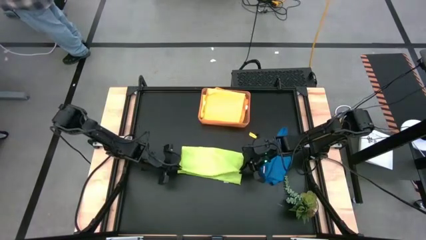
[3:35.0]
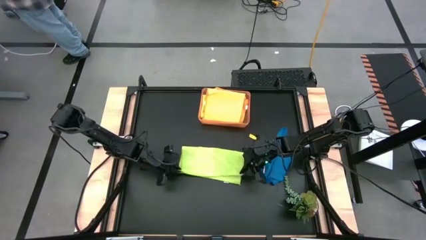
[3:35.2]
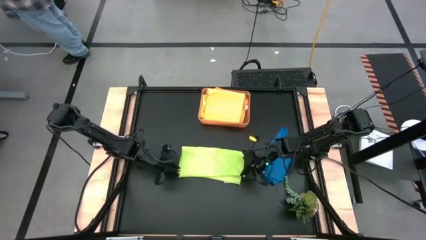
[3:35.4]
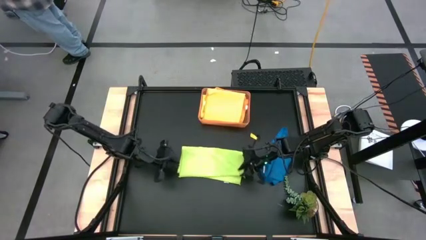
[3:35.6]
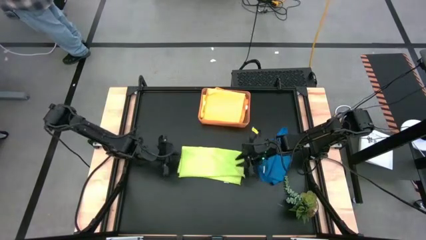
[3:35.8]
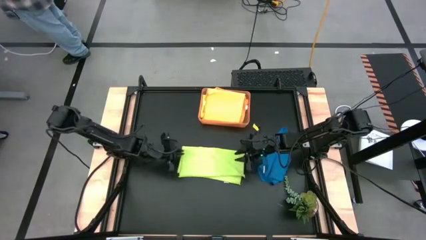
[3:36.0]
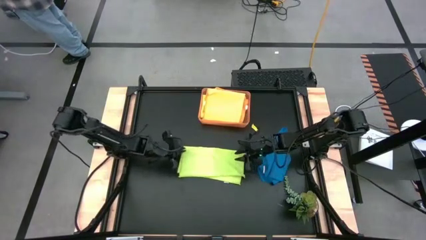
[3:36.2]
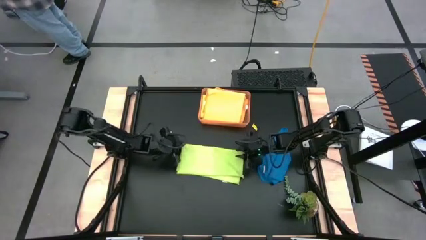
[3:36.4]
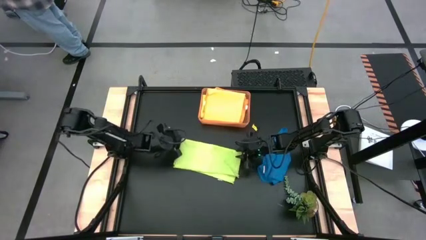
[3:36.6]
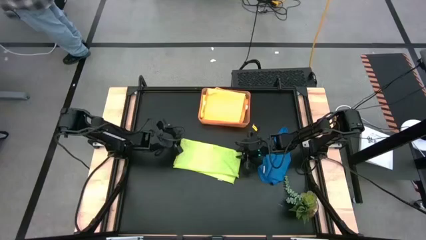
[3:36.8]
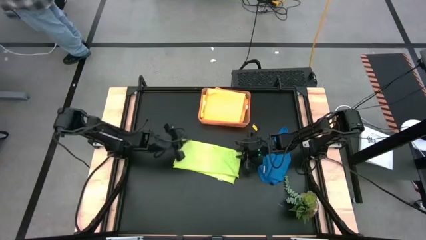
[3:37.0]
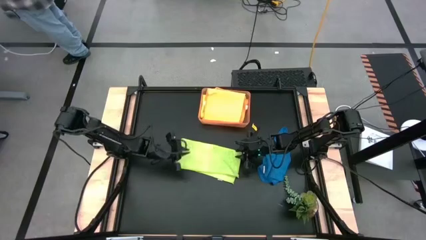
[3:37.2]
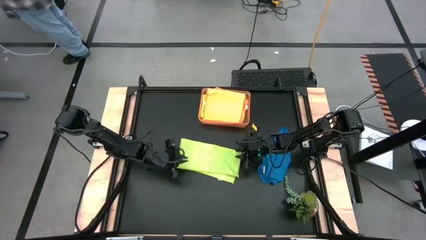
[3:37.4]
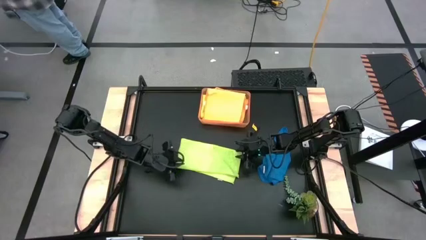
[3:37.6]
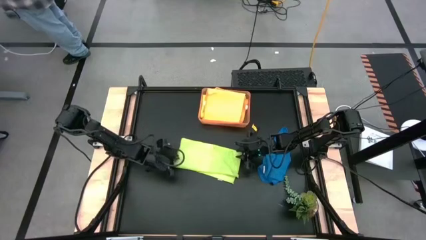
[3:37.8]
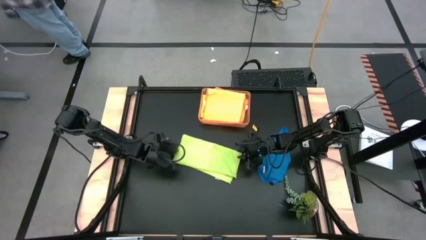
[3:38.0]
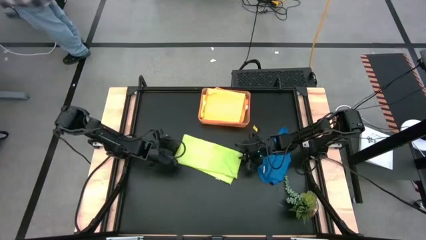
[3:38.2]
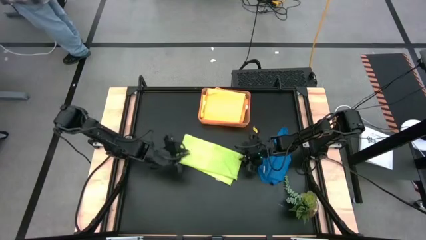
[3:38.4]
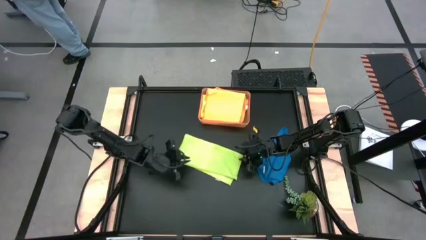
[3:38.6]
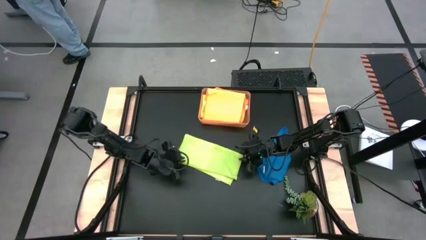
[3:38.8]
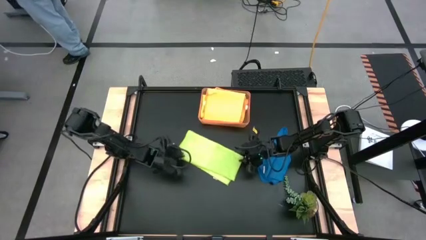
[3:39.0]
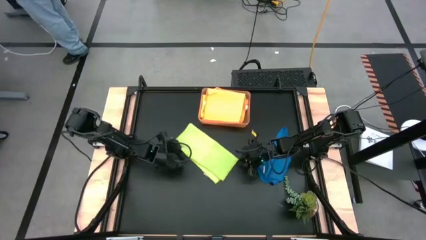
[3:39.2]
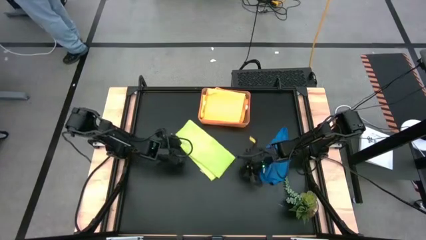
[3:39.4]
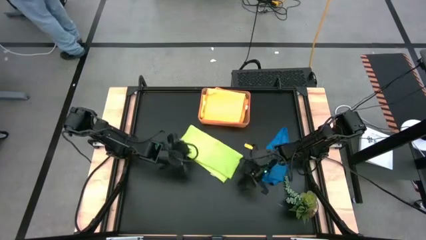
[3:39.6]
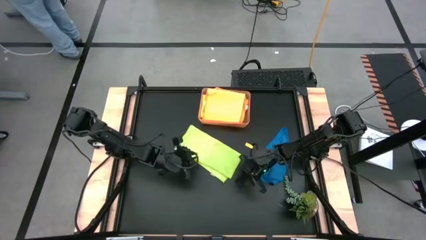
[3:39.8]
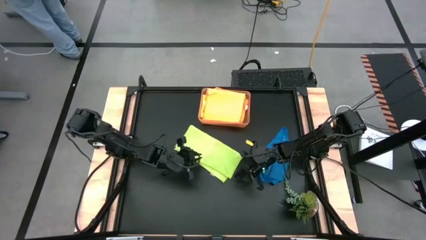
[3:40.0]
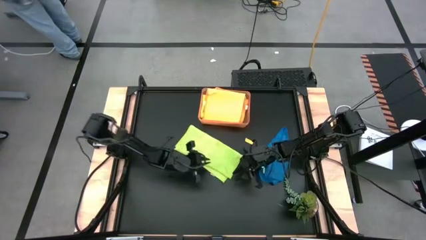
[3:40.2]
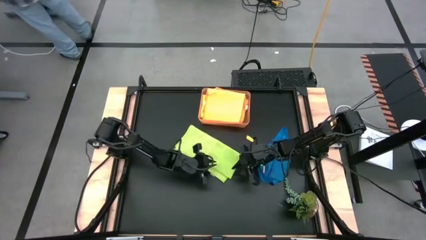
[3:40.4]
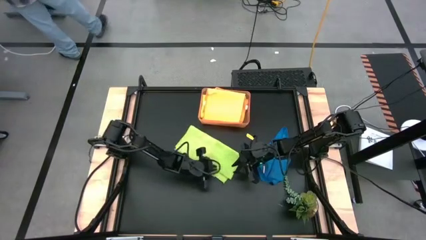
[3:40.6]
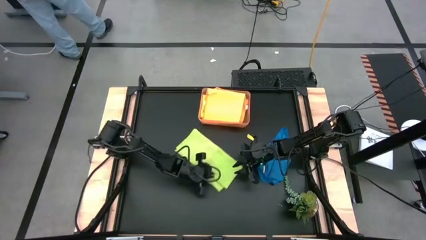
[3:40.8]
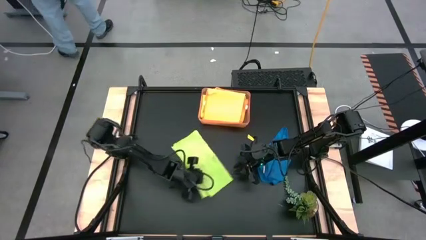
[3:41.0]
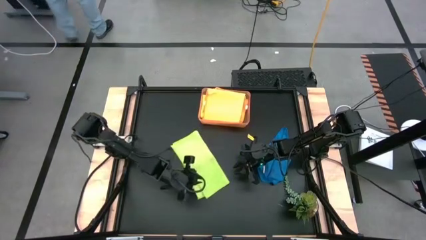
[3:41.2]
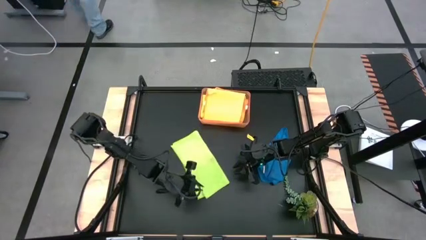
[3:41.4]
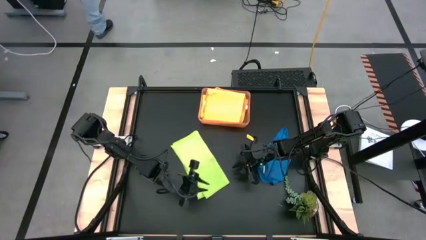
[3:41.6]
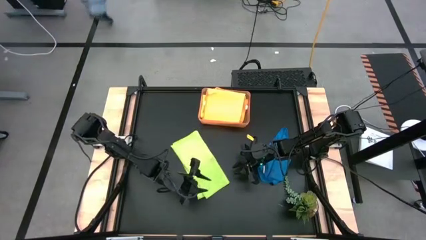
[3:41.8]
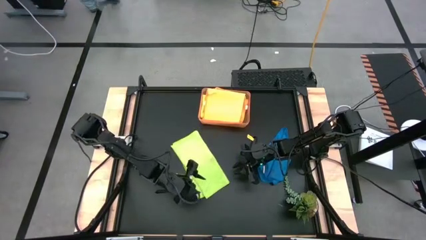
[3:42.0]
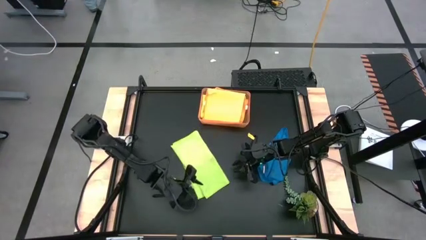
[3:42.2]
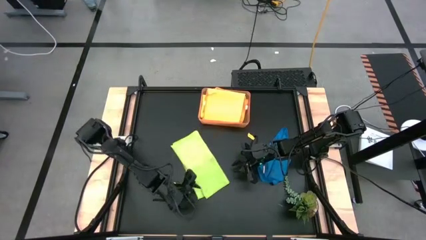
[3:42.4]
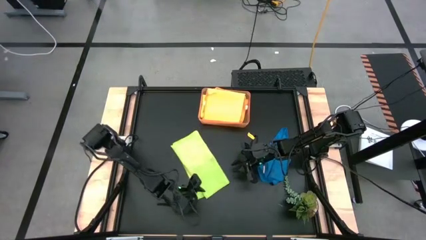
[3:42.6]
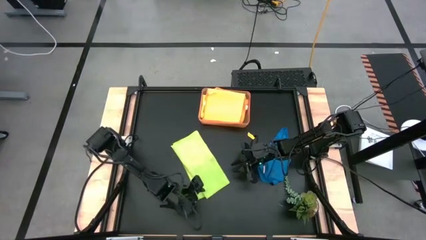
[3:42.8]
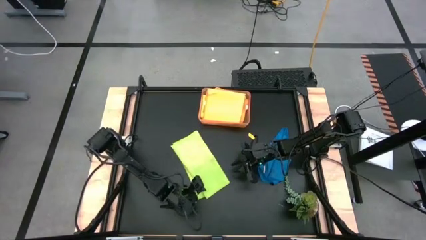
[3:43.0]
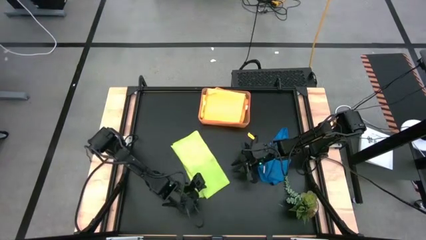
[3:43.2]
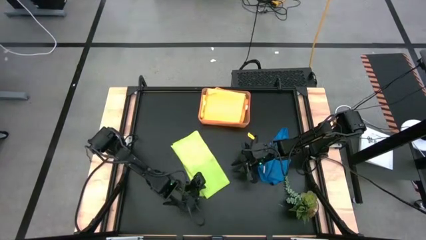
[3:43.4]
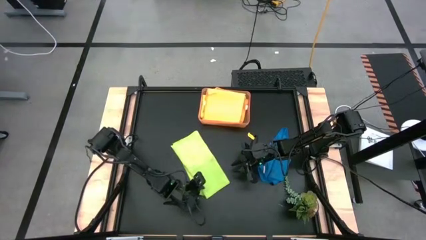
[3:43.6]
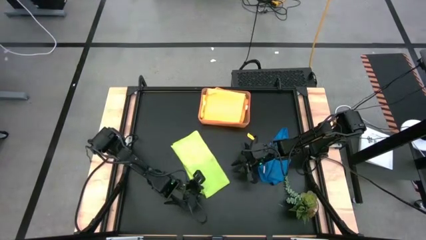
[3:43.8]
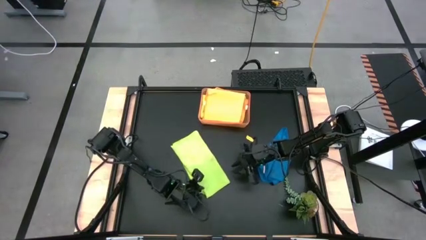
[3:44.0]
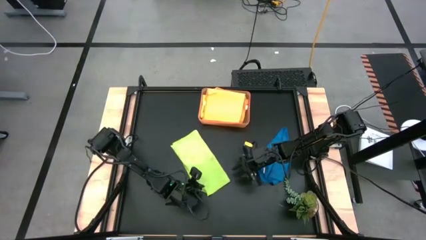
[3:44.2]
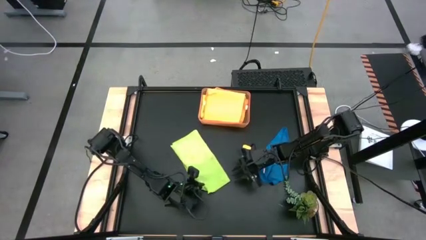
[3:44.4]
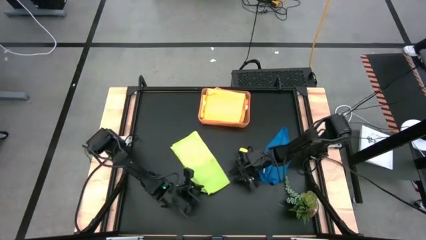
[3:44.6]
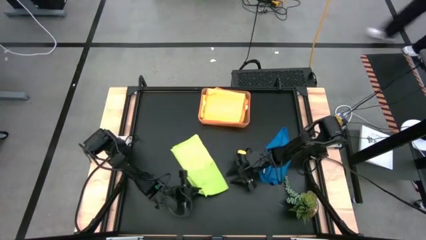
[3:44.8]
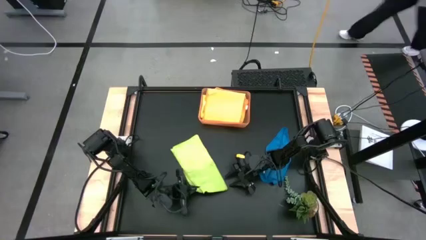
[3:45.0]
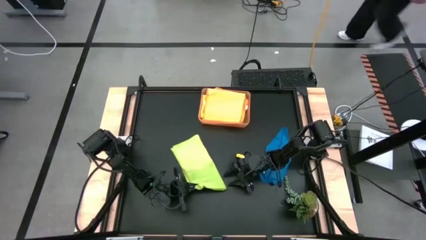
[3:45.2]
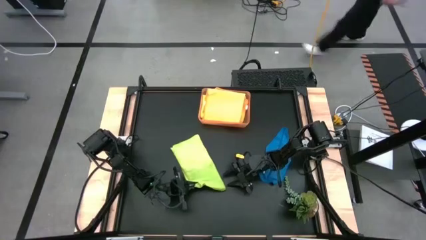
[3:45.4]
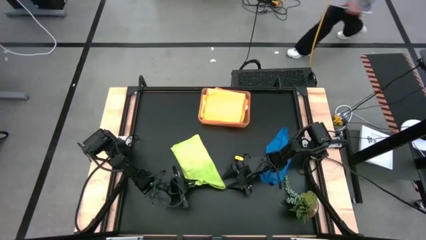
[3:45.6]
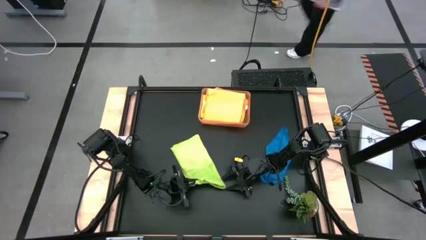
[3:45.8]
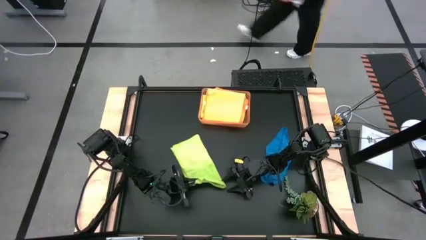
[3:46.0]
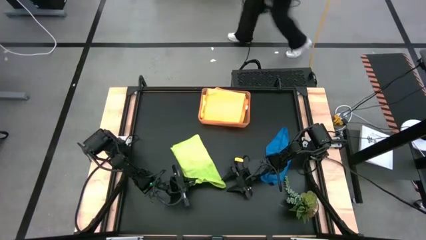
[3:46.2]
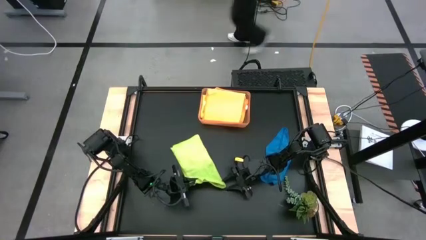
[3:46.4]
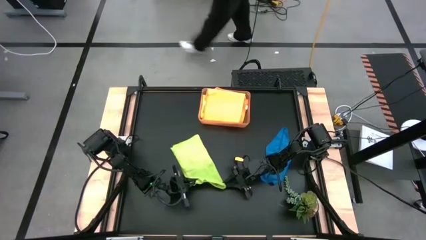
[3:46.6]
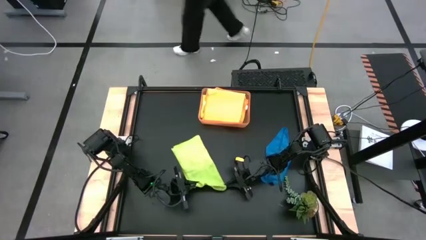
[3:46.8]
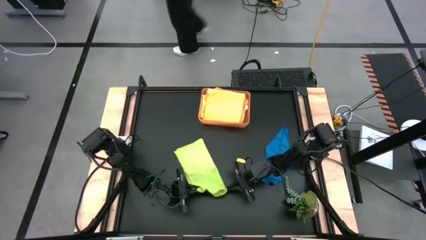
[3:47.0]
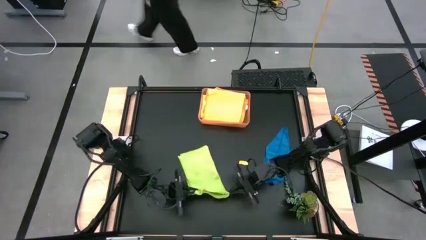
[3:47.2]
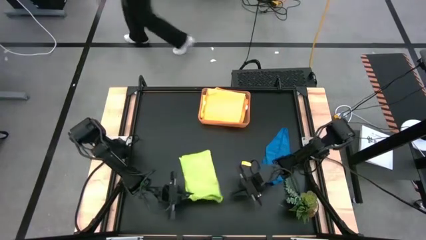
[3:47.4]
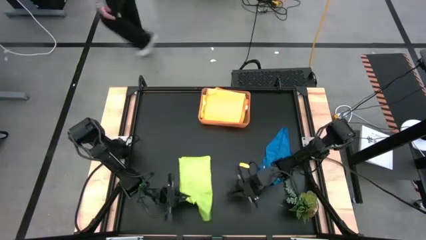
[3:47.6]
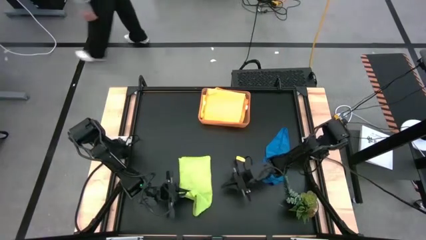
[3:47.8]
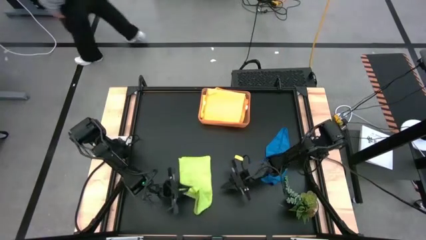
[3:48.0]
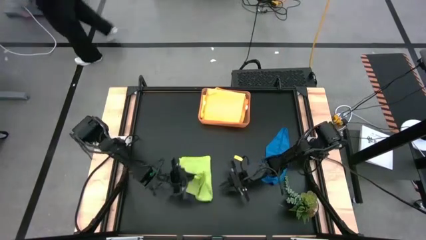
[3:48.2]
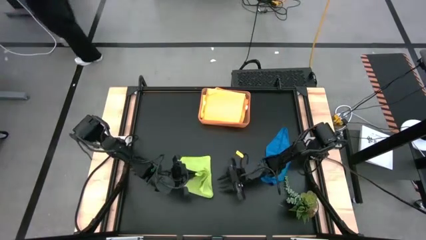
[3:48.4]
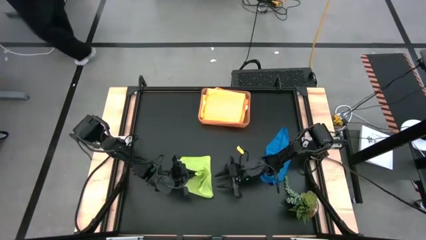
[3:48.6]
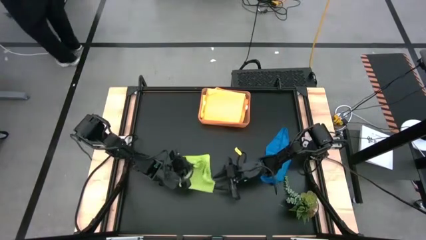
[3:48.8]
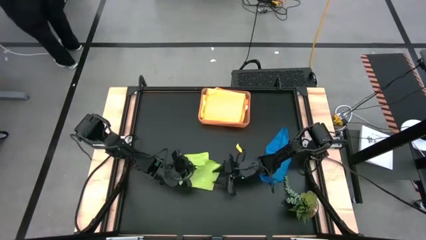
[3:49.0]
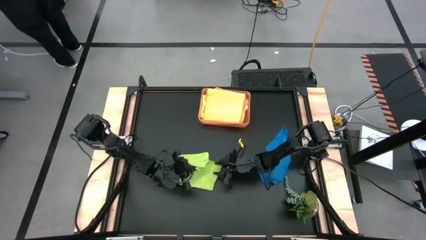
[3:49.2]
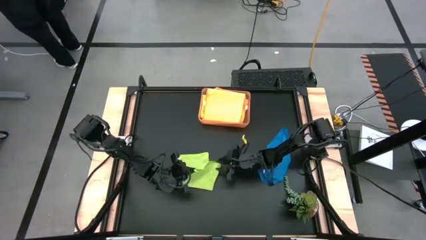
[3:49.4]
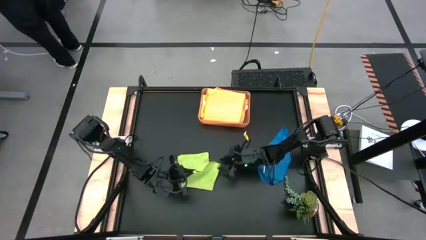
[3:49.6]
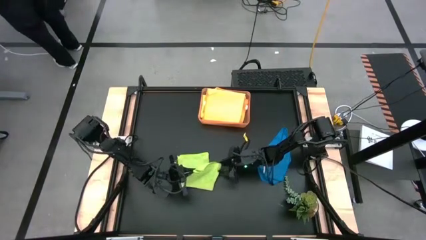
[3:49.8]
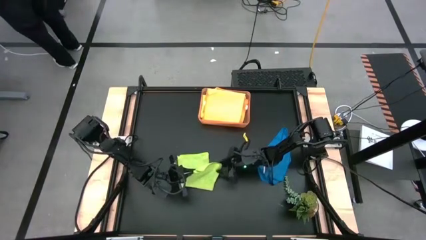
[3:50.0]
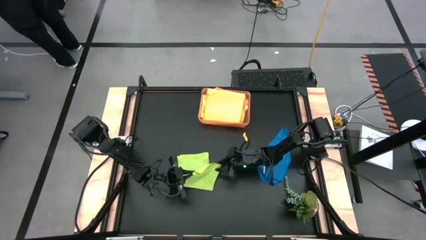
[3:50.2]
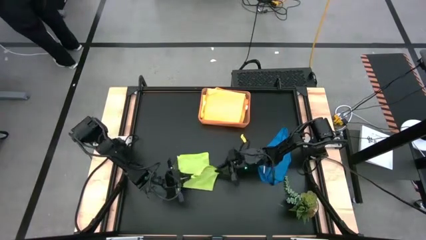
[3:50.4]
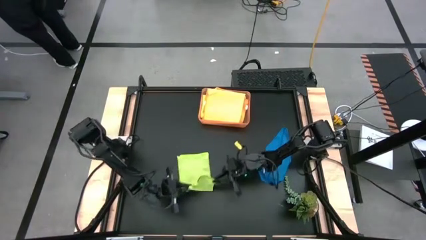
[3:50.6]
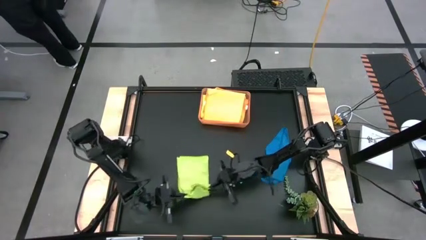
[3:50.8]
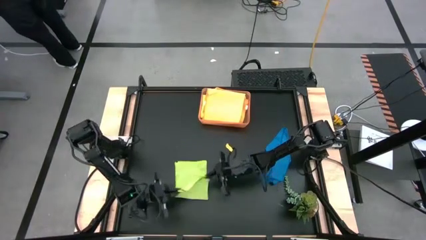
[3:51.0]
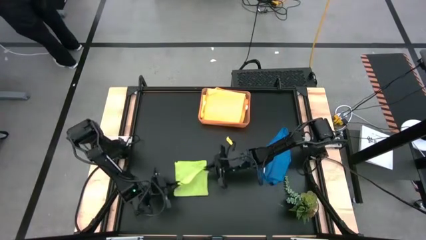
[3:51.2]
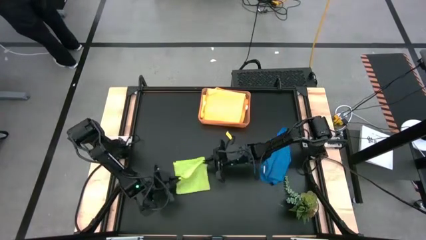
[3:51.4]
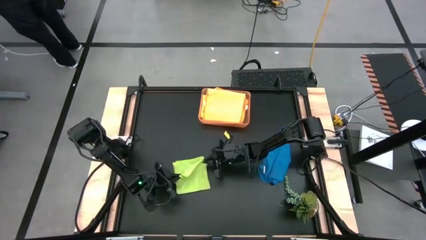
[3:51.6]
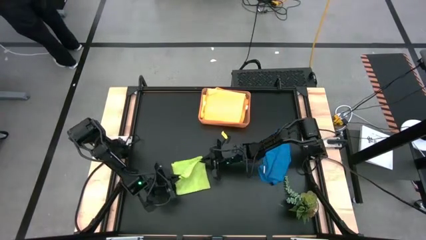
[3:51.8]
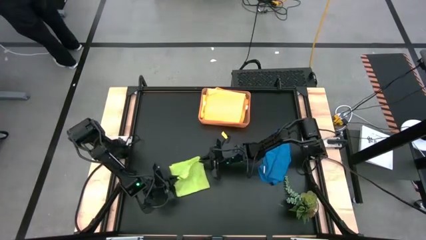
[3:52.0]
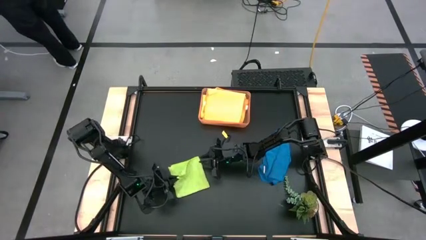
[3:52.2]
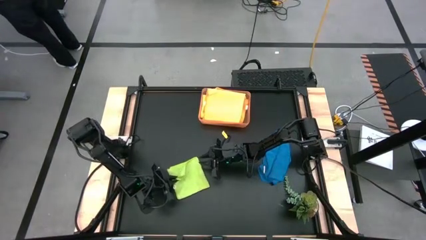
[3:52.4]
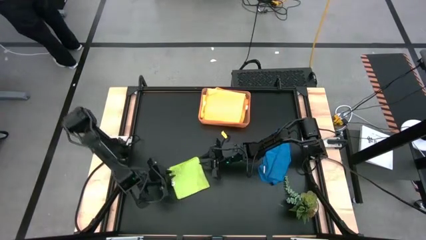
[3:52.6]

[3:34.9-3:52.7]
Task: Fold microfiber towels
Fold the green towel
